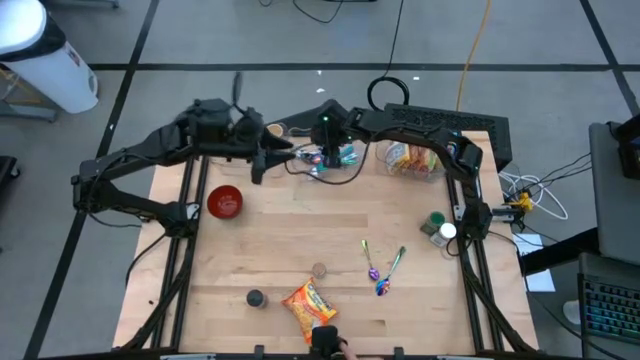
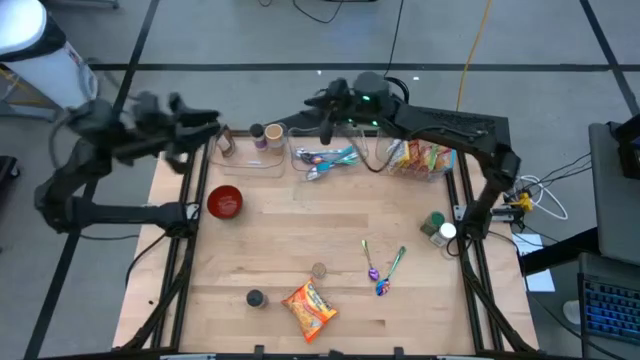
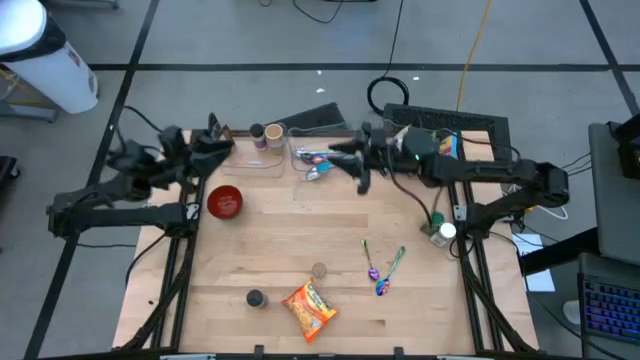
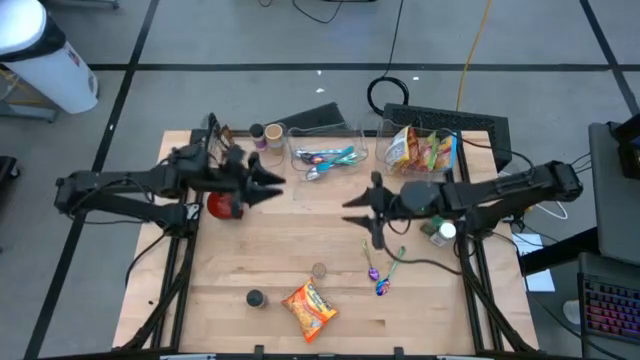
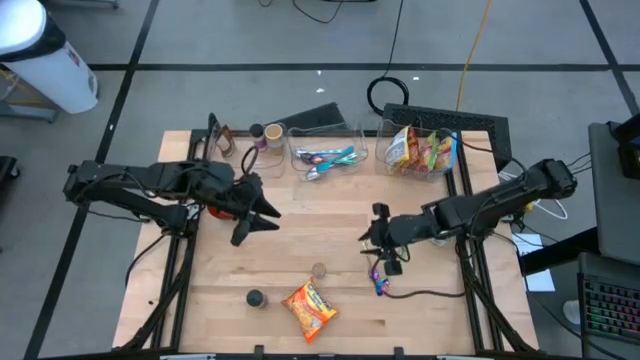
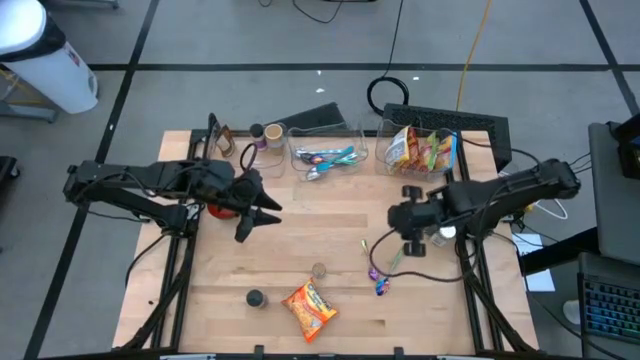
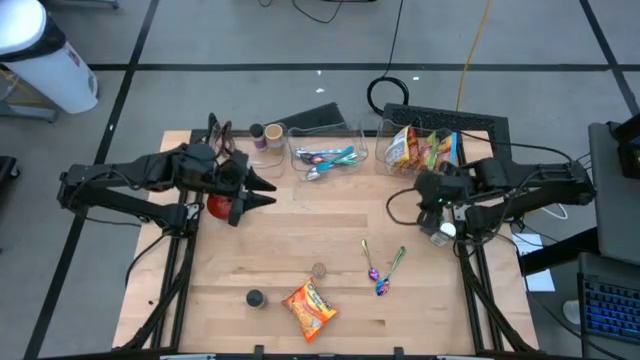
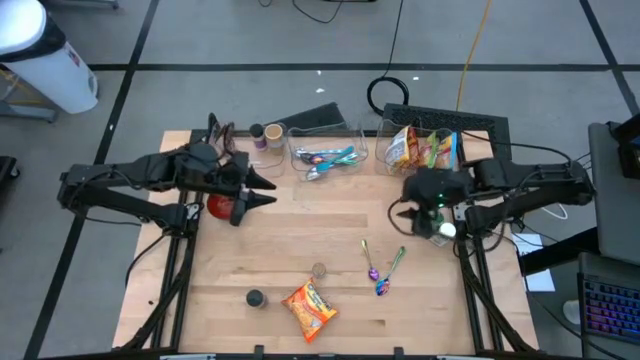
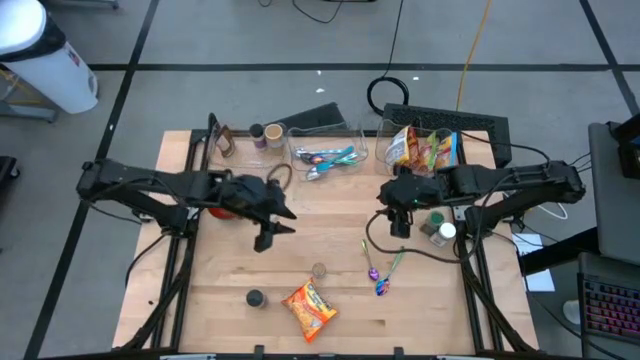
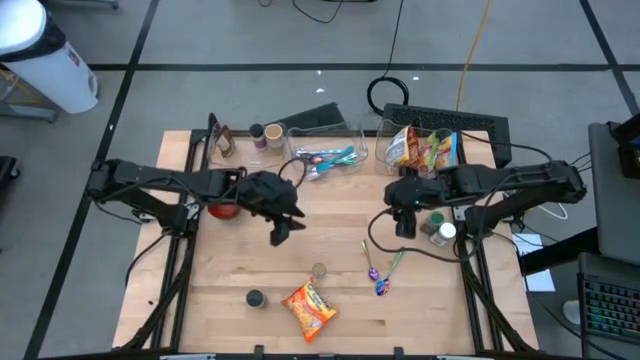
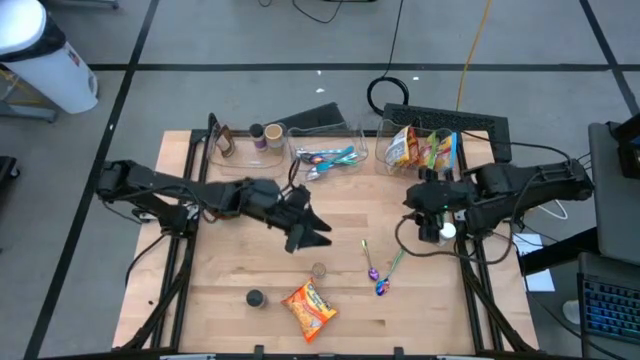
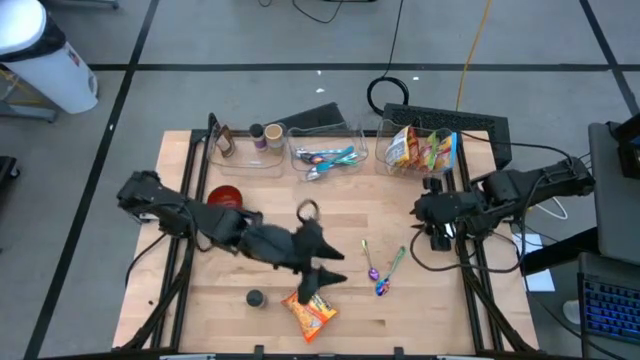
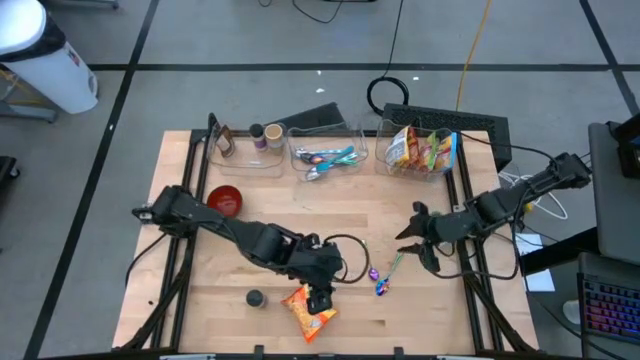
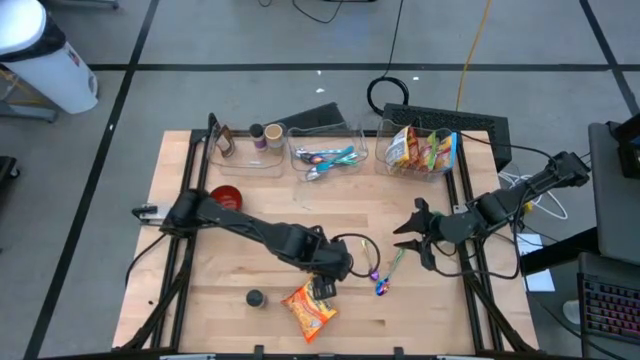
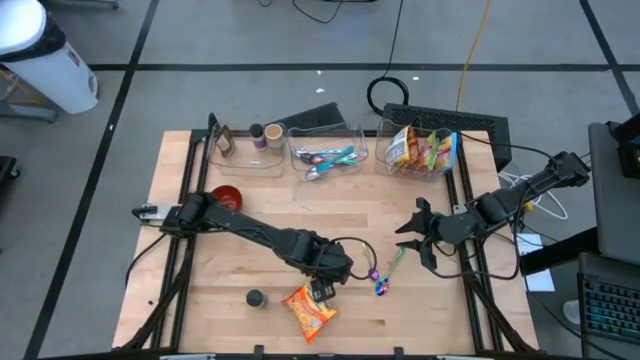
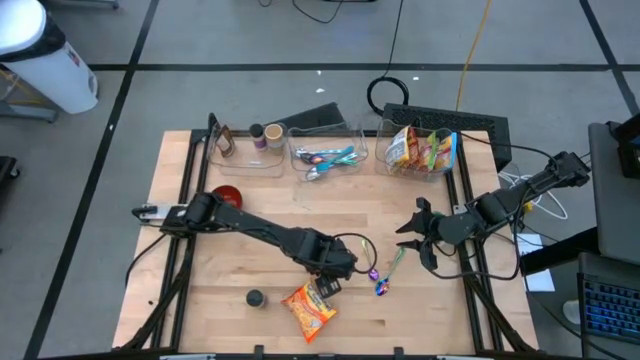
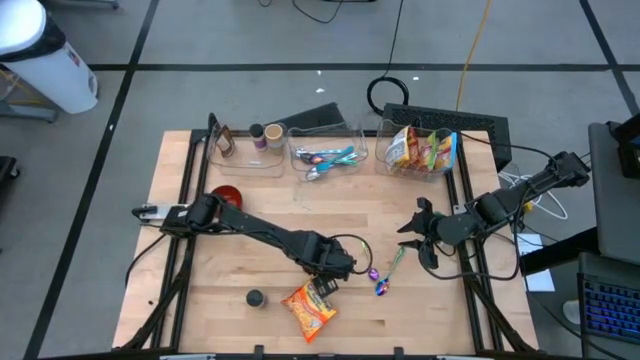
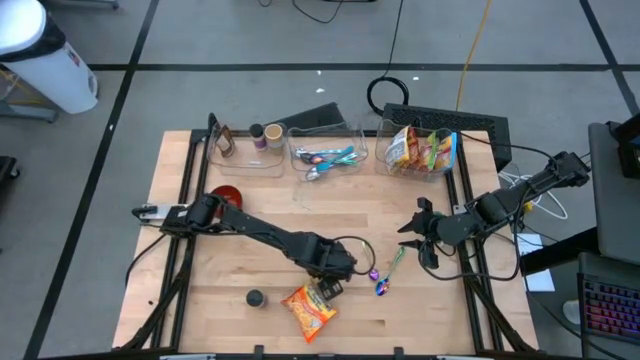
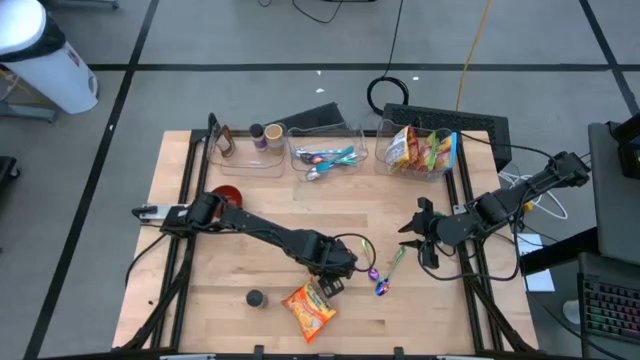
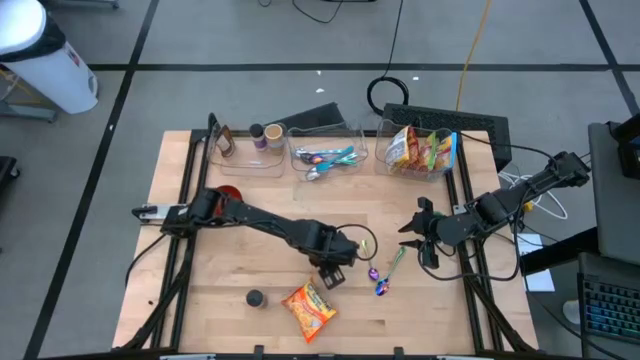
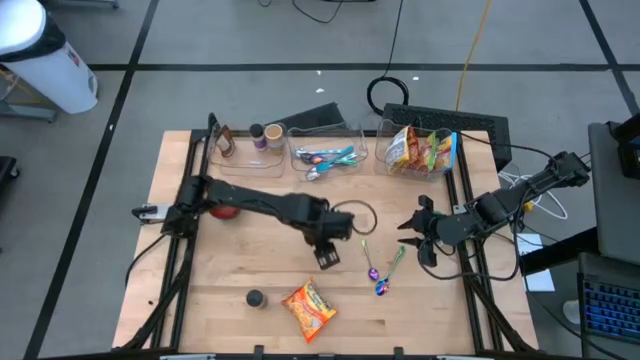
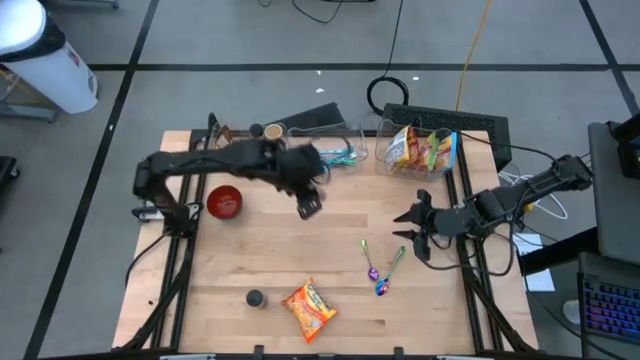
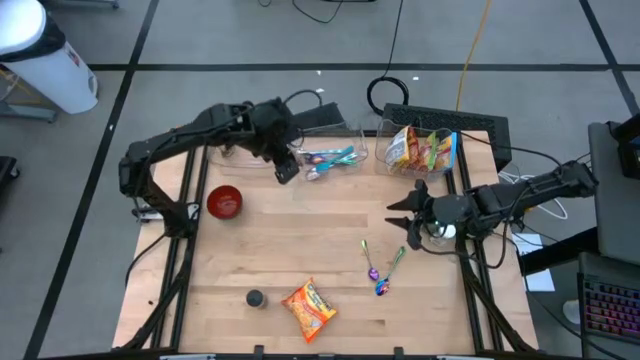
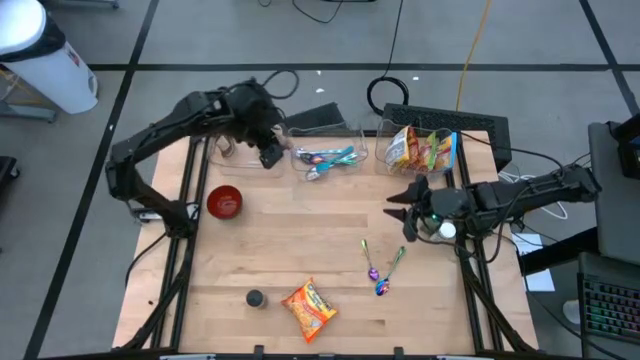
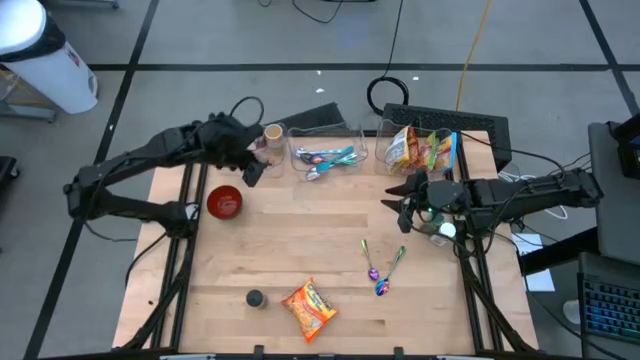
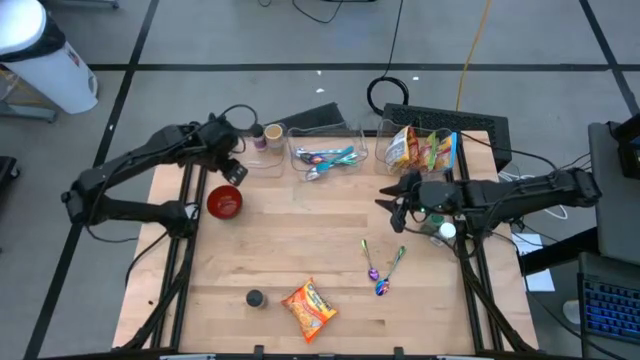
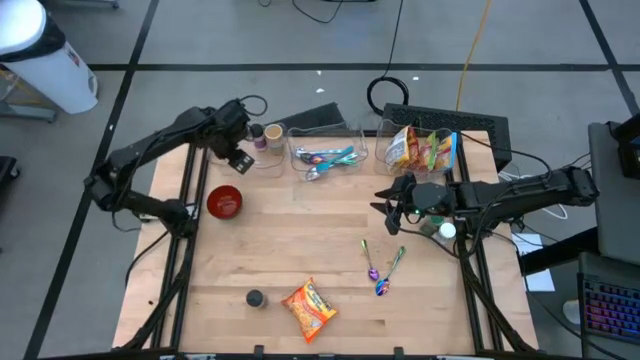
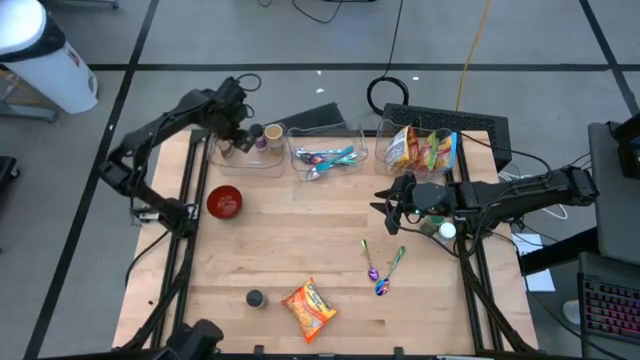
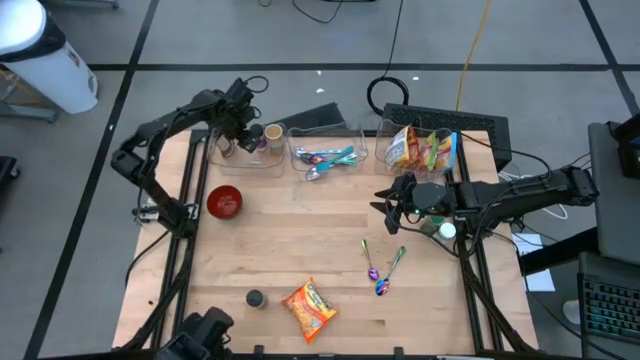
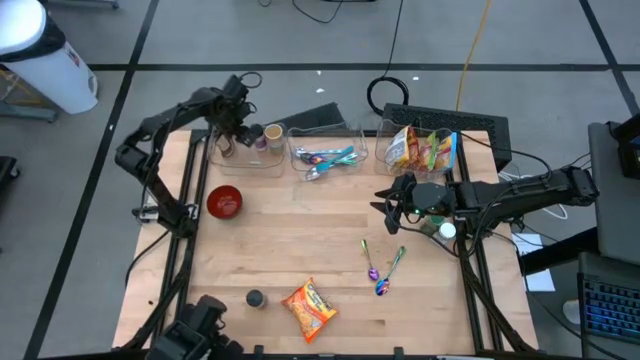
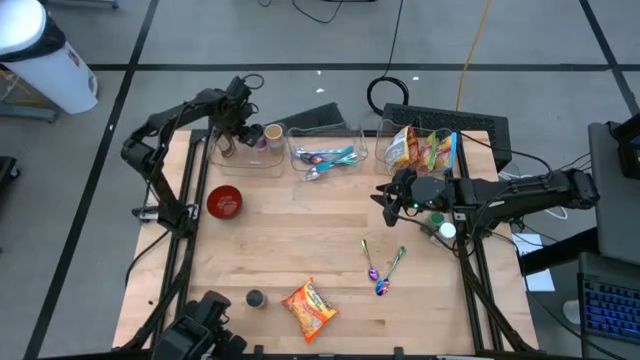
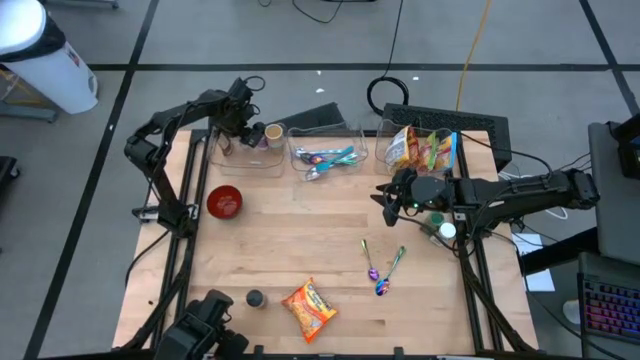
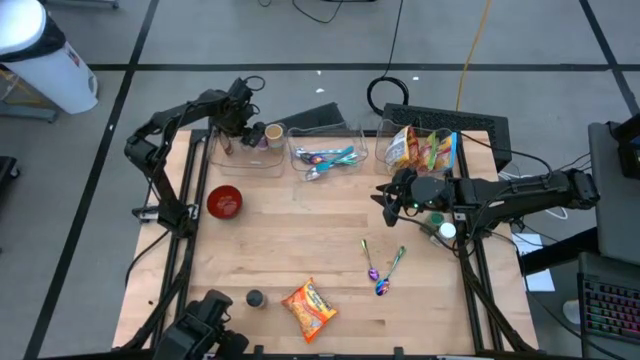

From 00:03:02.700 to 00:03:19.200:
Task: Pick & Place Food Item
Put the brown seasoning bottle into the left transparent bin

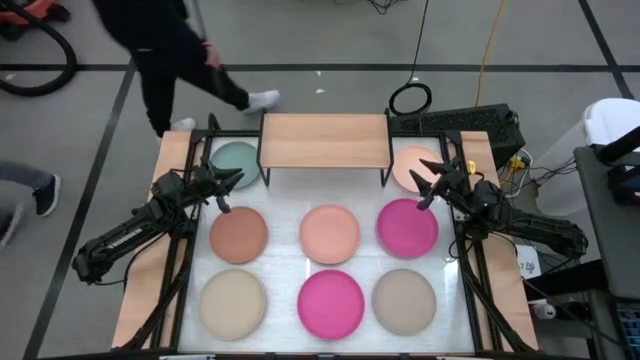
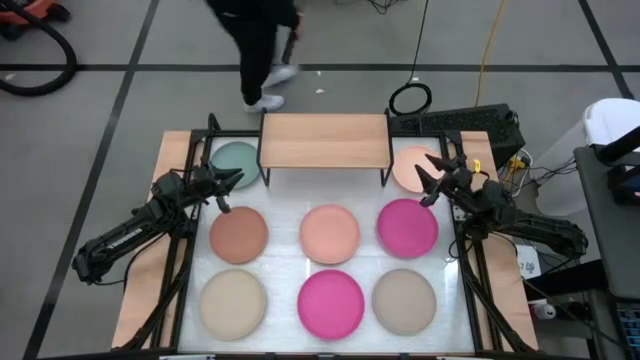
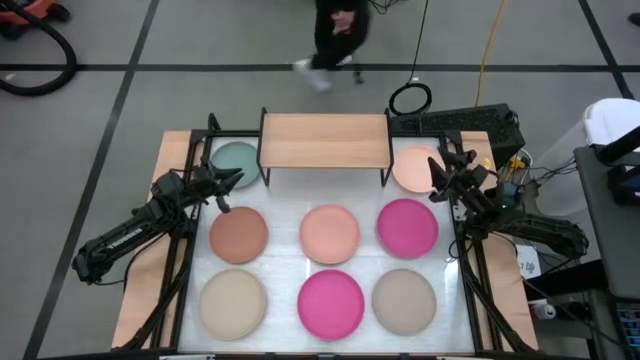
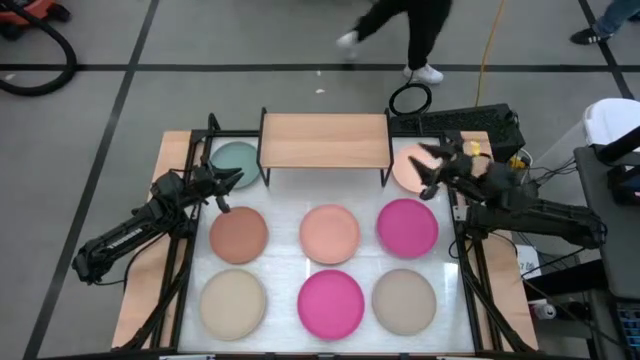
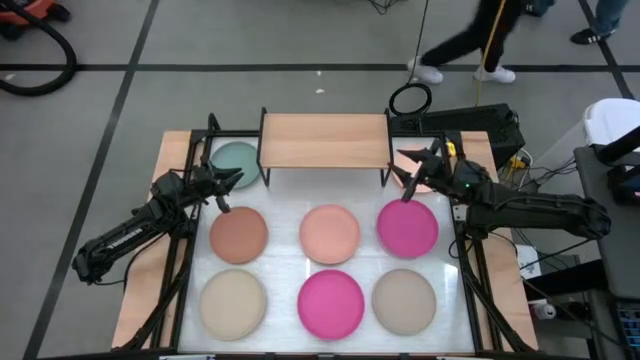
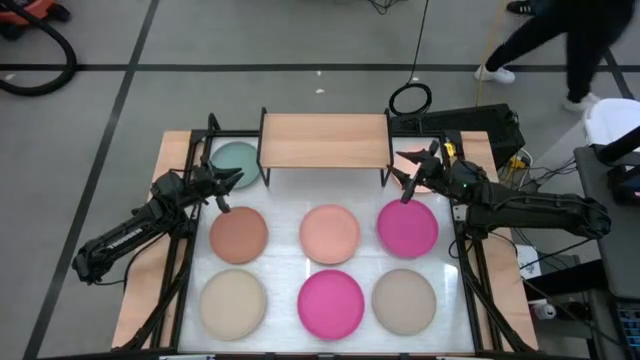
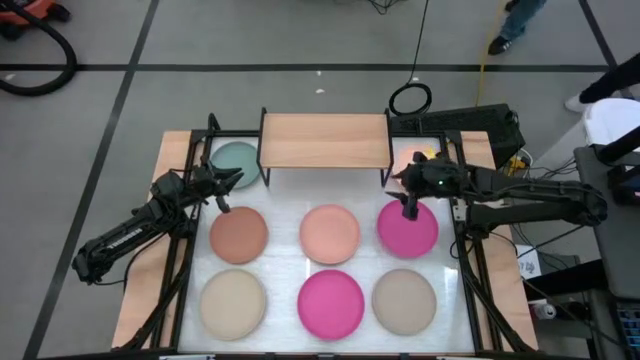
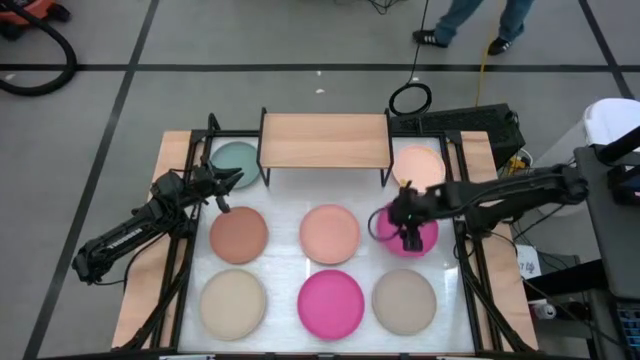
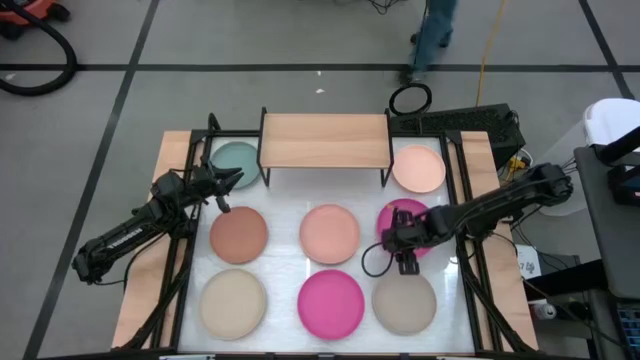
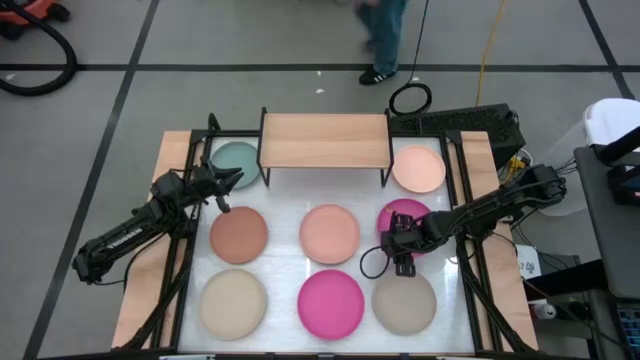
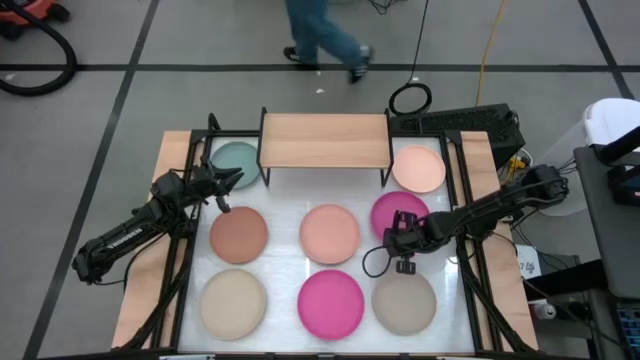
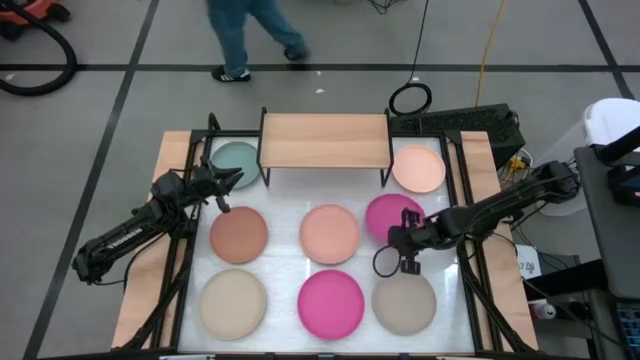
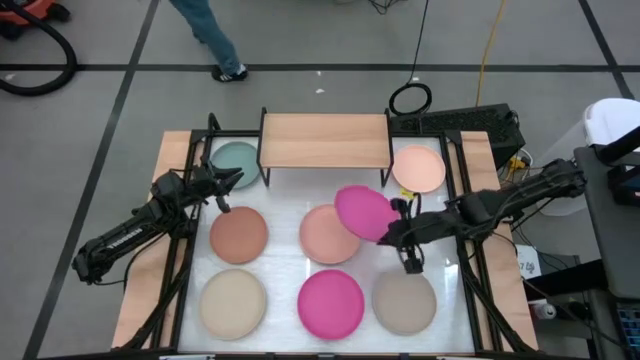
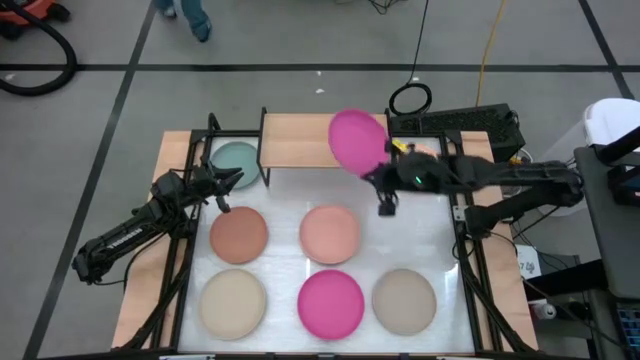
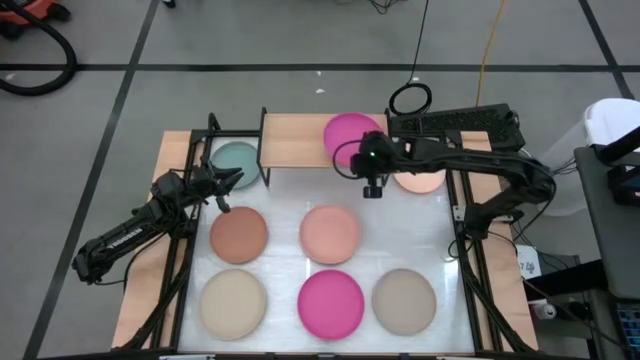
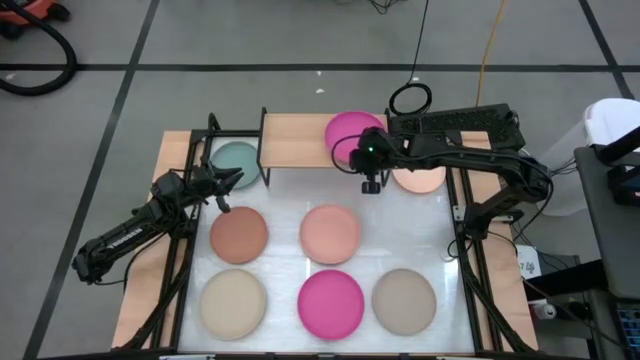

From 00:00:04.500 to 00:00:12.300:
Task: Place and stack plates onto a shelf
Put the top pink plate on the shelf
